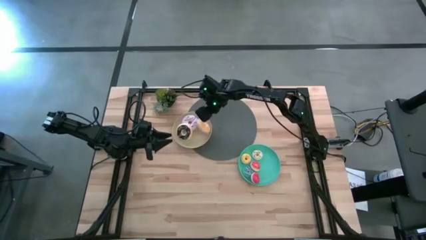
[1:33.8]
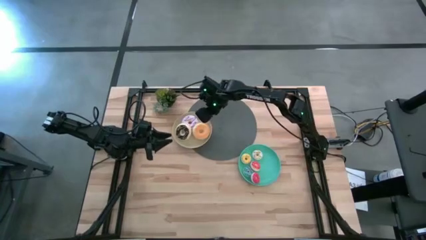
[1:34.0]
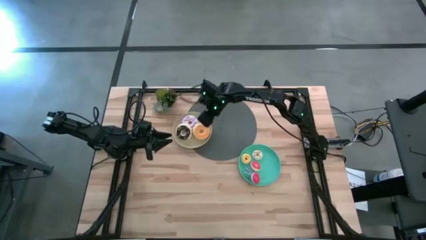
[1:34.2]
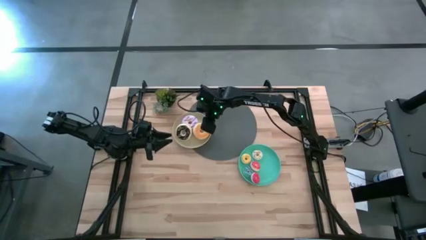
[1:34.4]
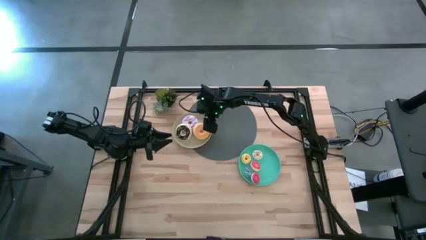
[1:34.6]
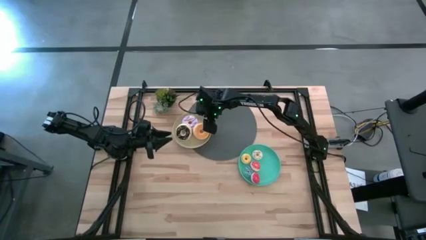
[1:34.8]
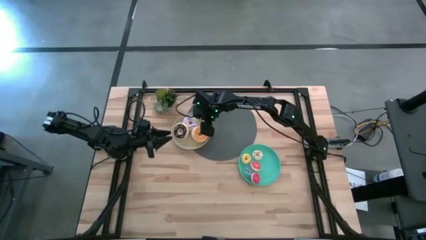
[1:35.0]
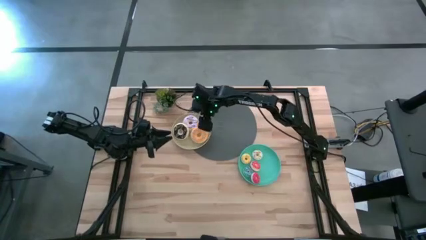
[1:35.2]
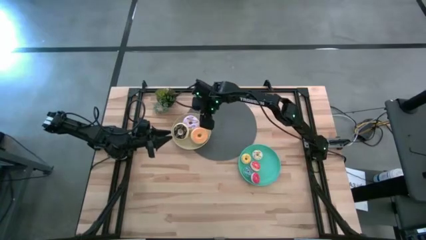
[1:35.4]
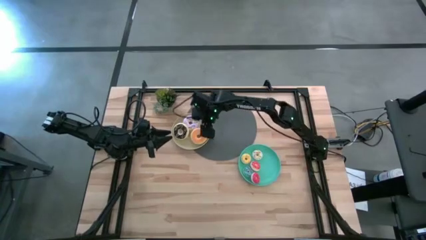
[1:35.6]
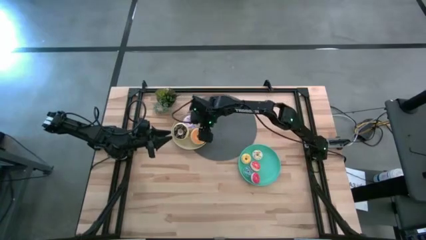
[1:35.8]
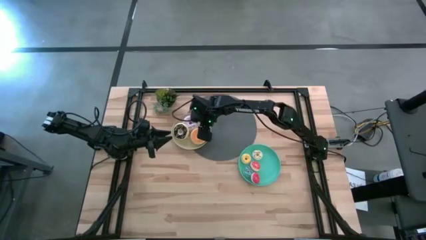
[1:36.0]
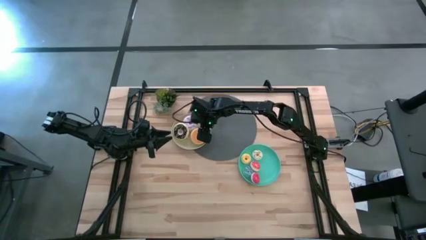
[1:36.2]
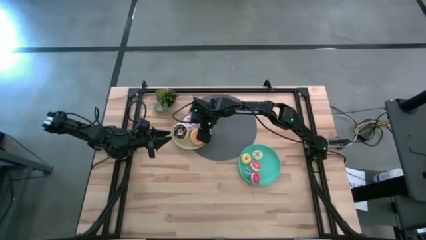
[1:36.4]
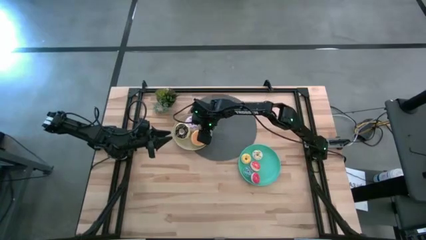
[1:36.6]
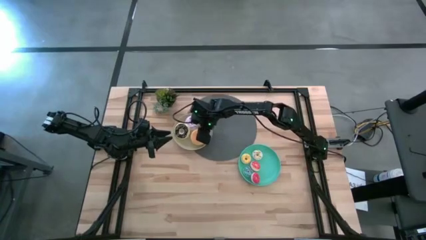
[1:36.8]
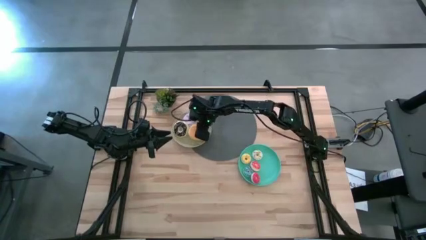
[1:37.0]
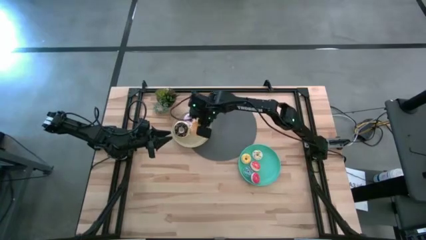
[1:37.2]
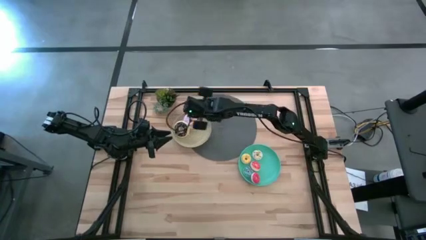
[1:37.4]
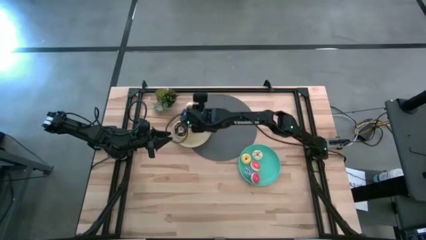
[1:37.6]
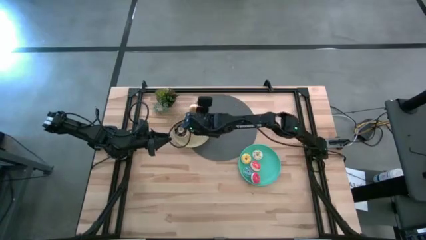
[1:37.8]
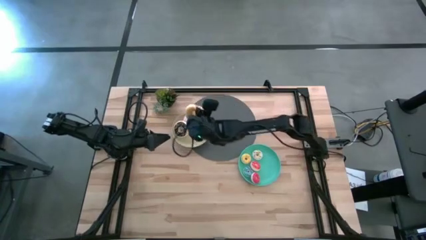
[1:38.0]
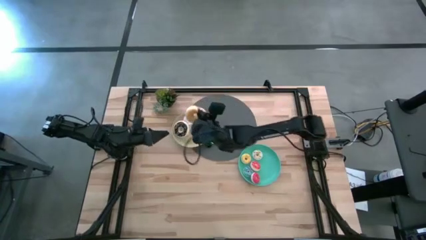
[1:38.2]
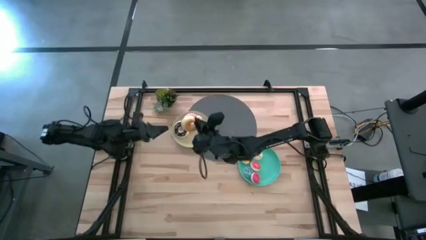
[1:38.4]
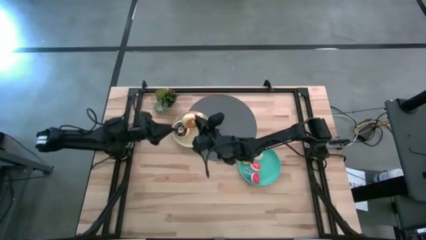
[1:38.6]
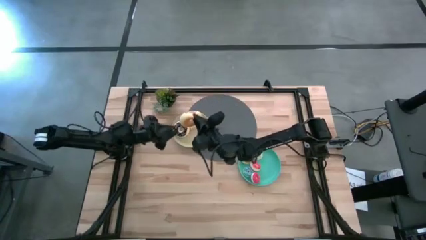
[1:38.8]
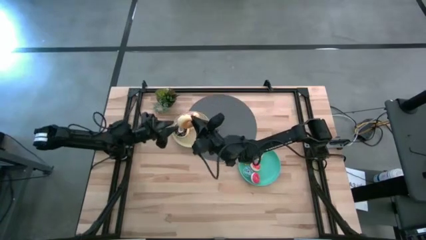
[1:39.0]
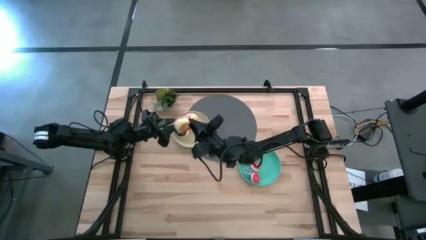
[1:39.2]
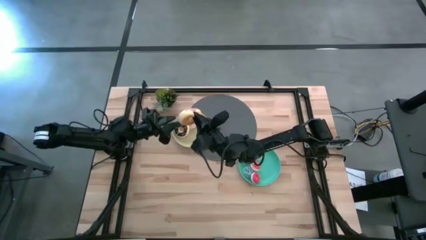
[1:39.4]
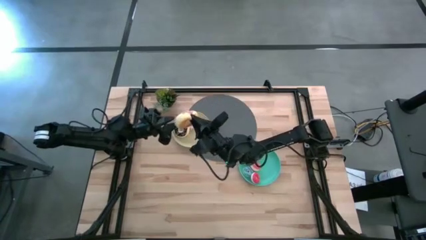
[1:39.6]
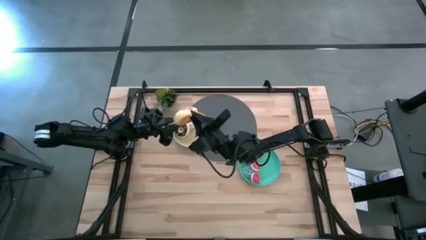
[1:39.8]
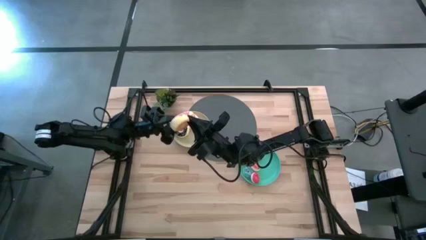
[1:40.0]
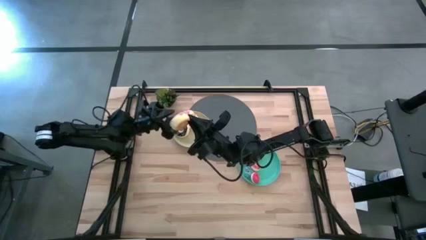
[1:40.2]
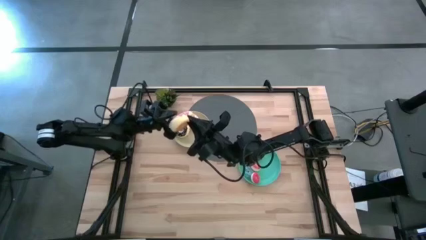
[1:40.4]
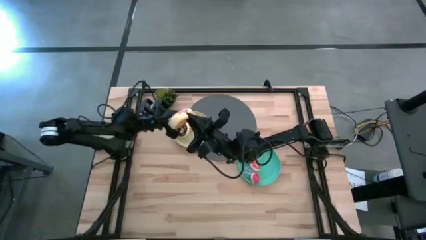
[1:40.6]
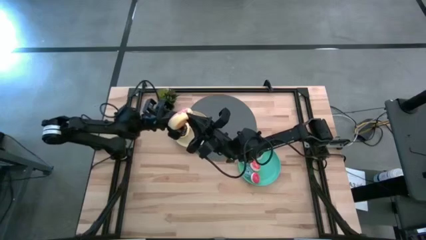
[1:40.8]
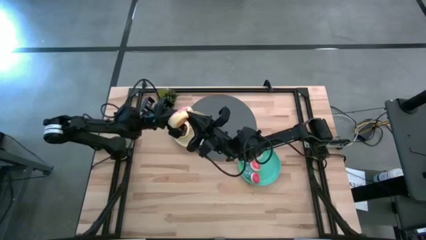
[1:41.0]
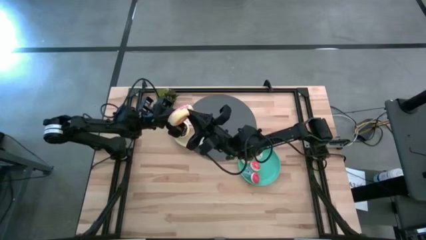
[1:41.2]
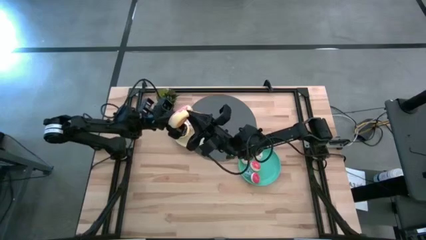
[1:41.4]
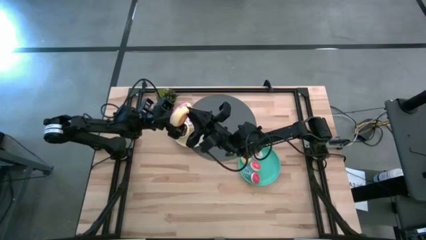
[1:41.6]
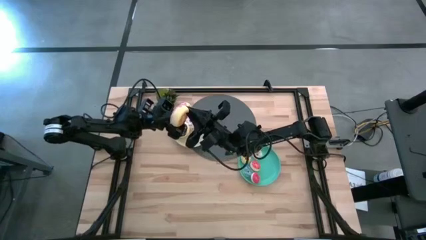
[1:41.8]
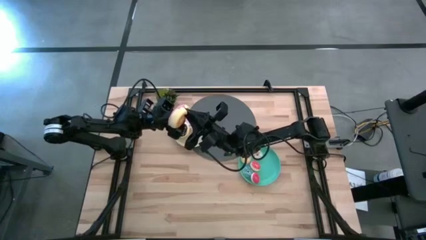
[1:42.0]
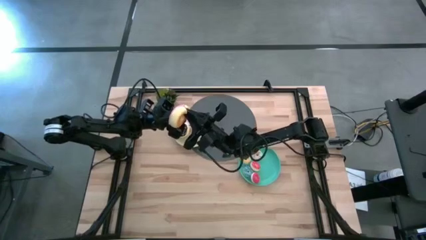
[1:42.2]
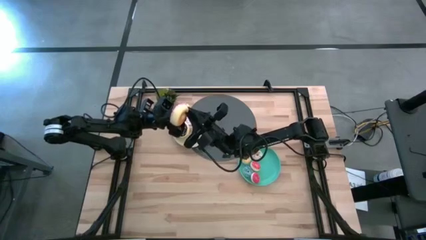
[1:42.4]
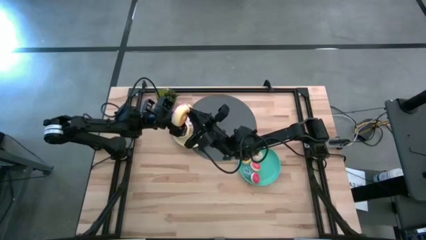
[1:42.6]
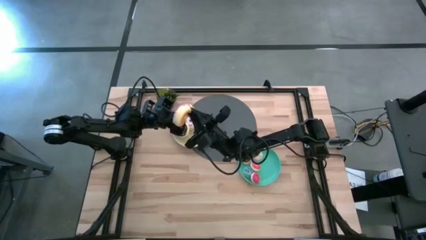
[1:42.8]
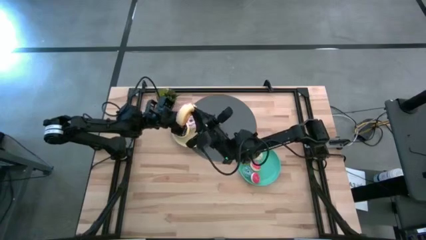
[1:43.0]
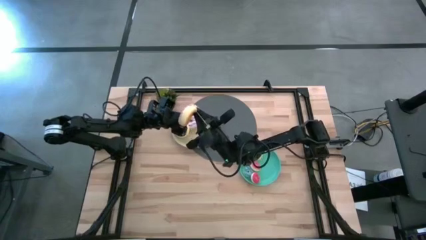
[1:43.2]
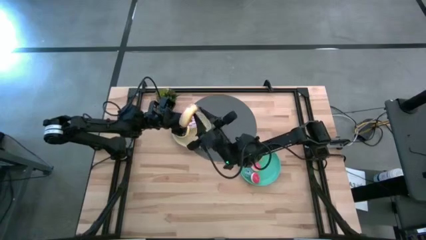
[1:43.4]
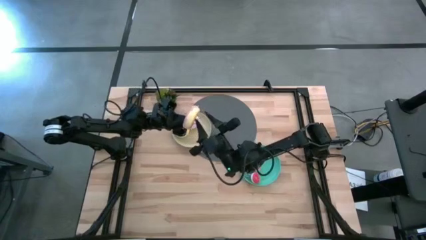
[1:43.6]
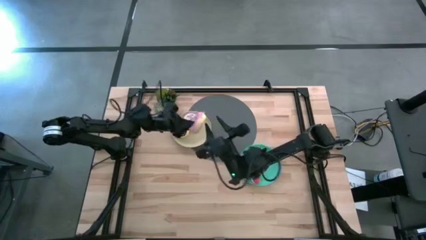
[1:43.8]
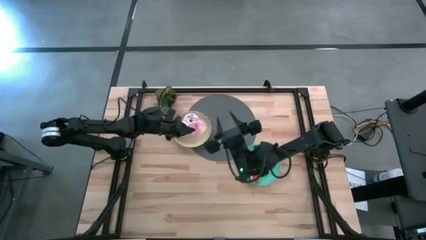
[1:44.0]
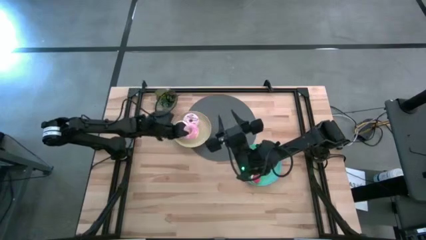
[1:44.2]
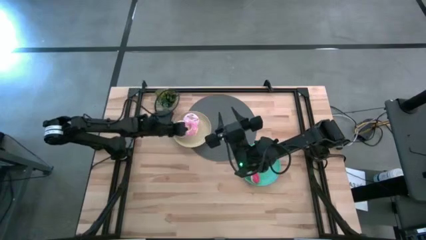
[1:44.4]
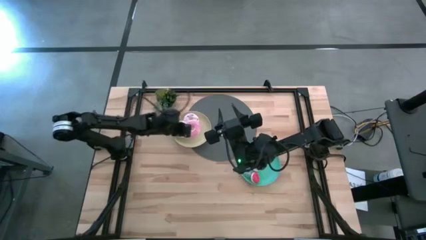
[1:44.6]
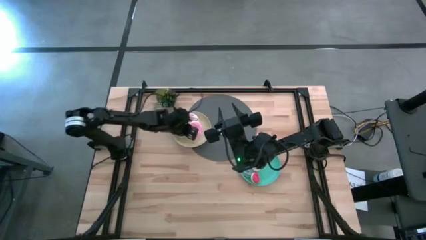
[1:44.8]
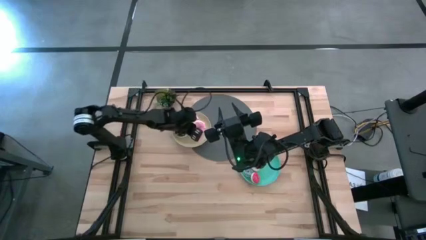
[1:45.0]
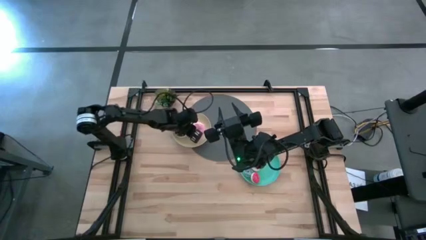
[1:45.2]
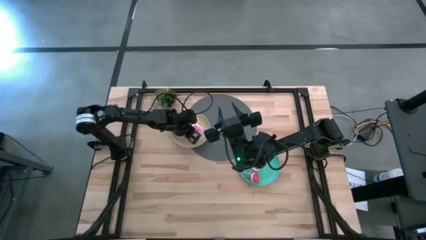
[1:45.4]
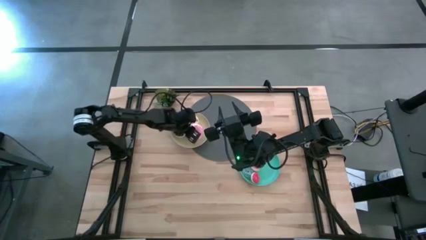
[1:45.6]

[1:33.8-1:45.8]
Task: Pick & Place donuts
Put the large pink donut on the brown plate
